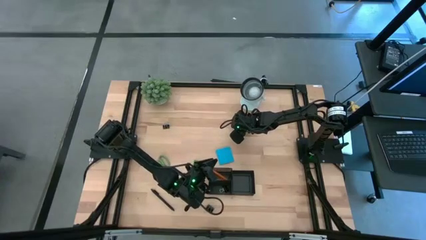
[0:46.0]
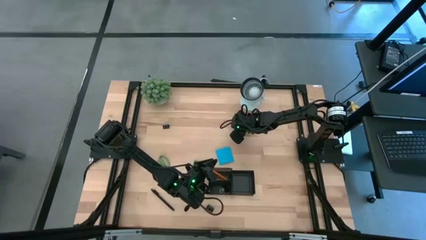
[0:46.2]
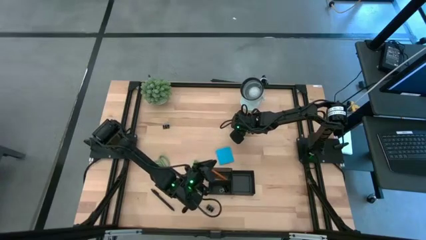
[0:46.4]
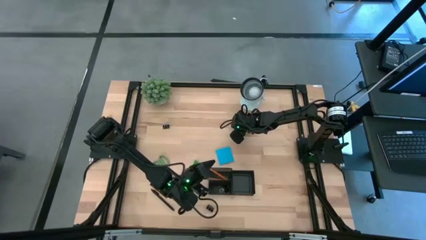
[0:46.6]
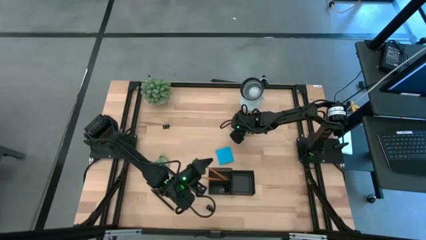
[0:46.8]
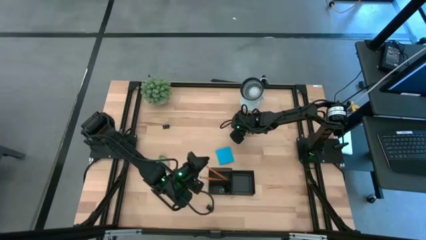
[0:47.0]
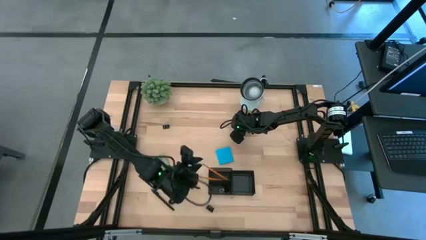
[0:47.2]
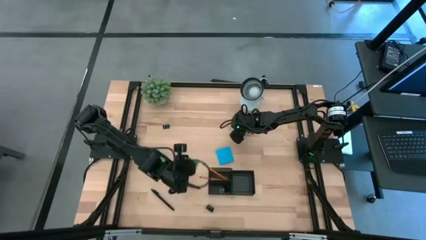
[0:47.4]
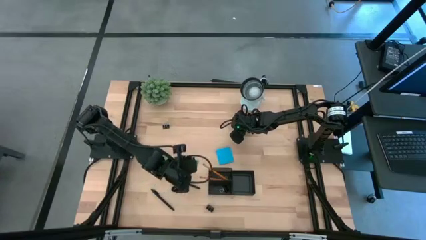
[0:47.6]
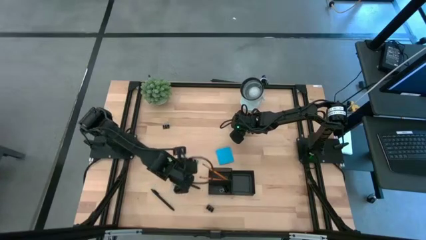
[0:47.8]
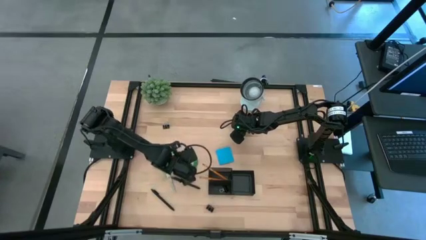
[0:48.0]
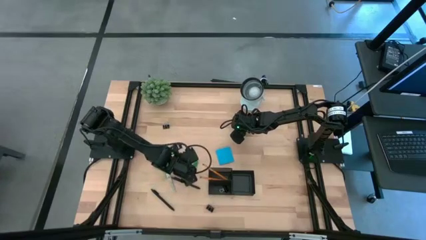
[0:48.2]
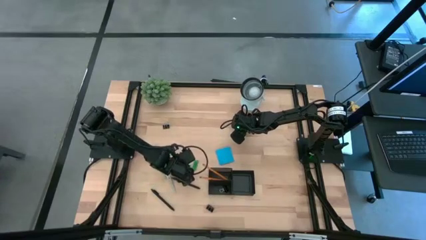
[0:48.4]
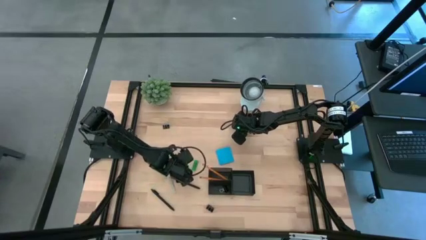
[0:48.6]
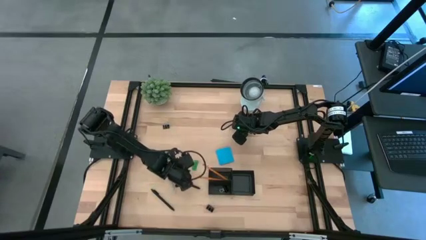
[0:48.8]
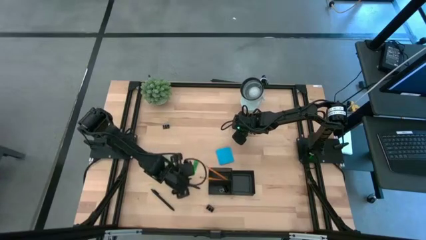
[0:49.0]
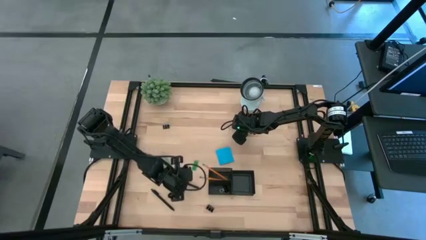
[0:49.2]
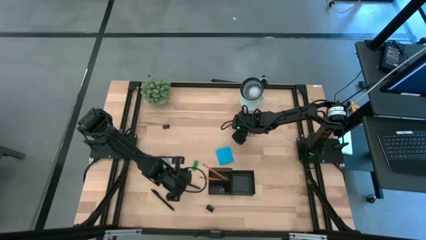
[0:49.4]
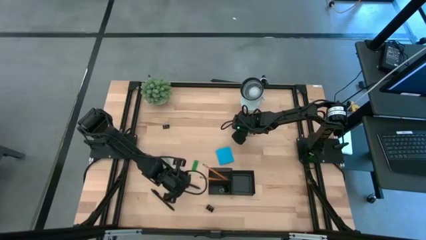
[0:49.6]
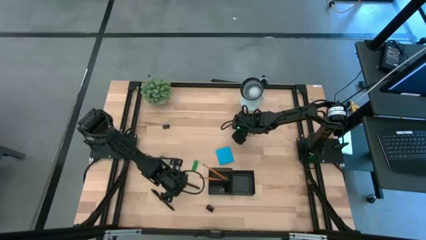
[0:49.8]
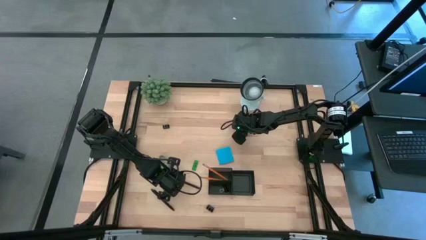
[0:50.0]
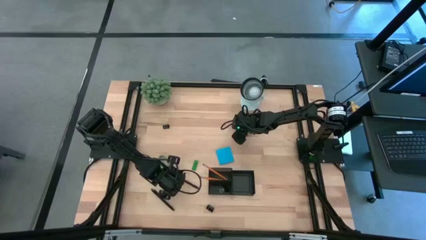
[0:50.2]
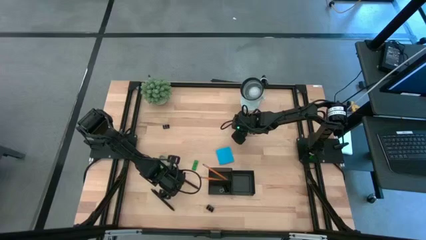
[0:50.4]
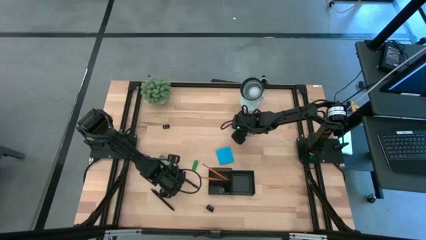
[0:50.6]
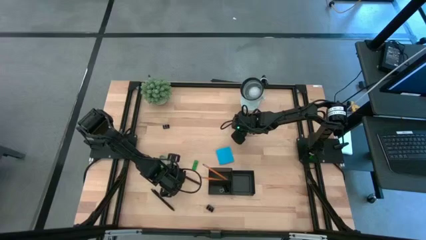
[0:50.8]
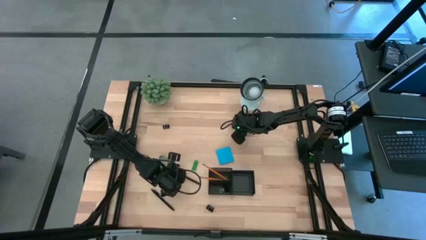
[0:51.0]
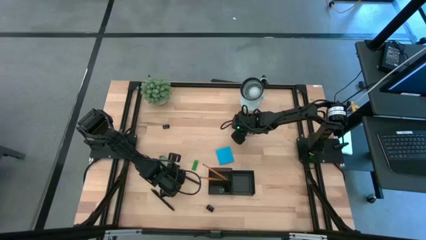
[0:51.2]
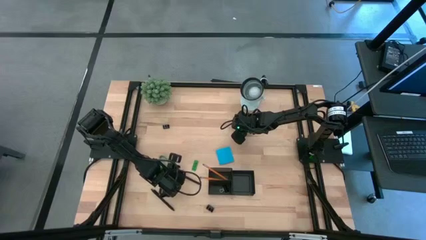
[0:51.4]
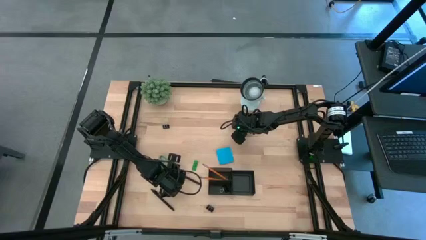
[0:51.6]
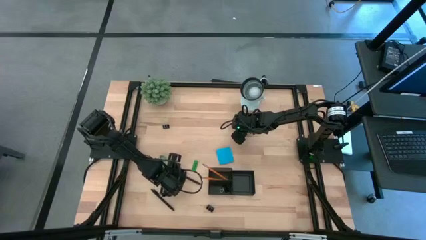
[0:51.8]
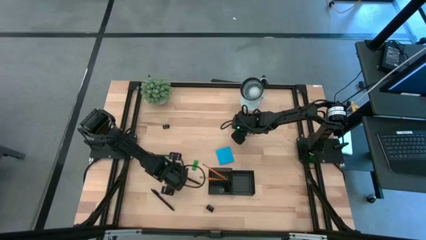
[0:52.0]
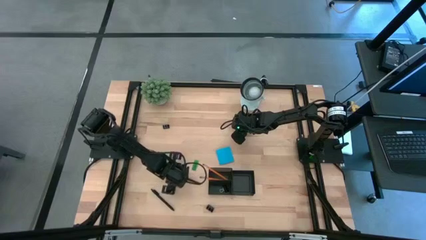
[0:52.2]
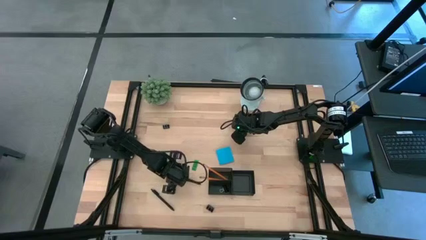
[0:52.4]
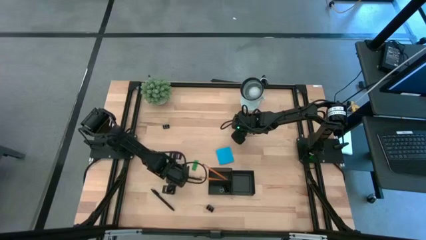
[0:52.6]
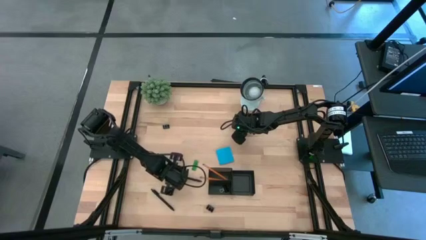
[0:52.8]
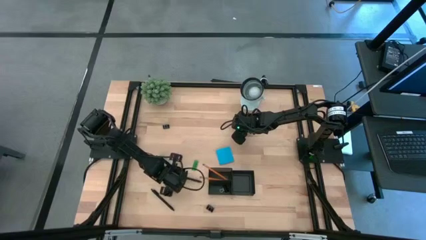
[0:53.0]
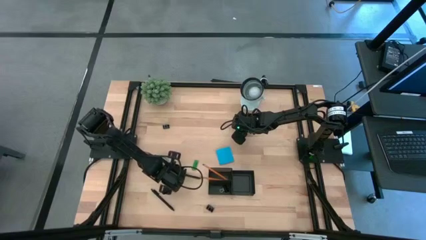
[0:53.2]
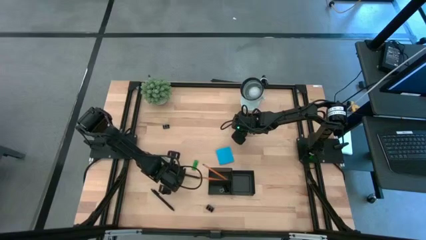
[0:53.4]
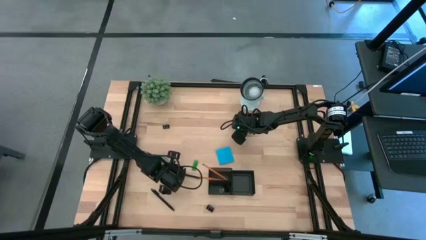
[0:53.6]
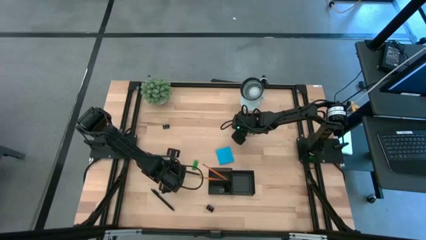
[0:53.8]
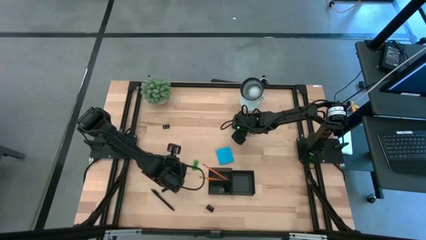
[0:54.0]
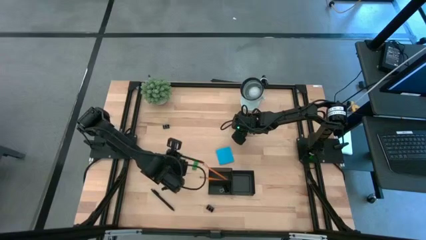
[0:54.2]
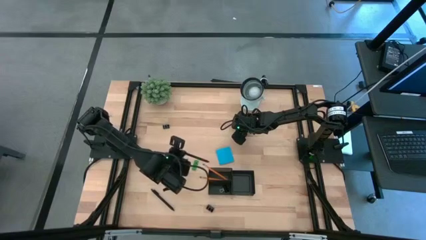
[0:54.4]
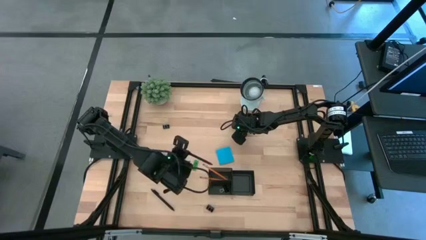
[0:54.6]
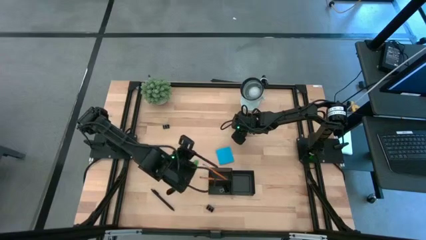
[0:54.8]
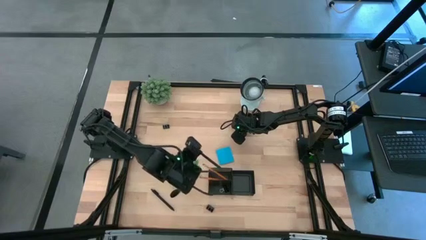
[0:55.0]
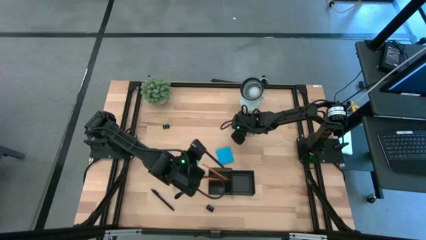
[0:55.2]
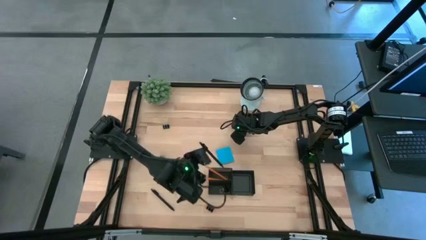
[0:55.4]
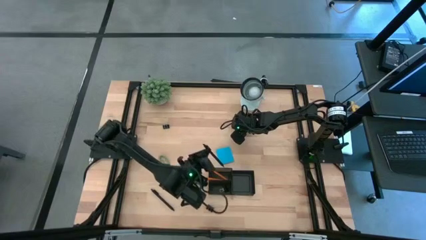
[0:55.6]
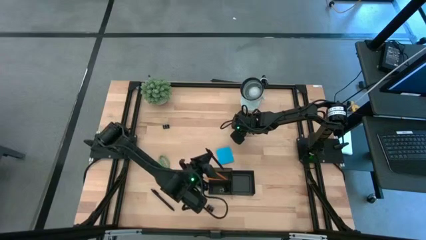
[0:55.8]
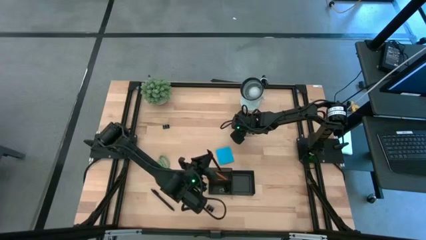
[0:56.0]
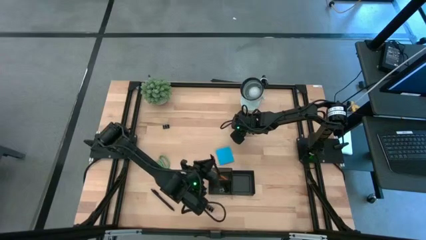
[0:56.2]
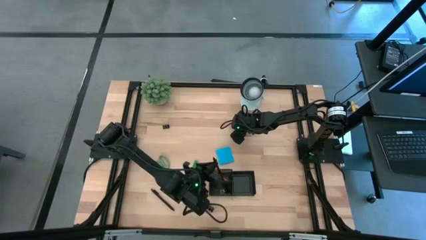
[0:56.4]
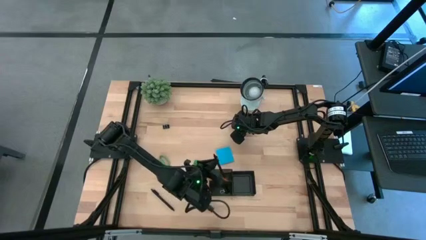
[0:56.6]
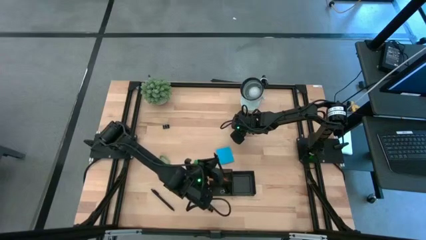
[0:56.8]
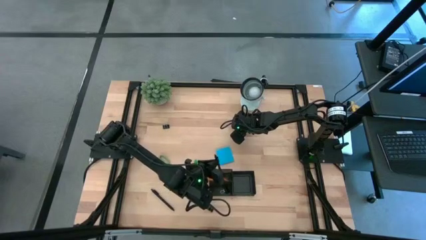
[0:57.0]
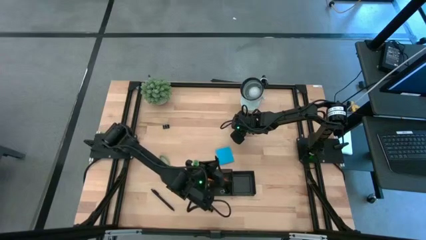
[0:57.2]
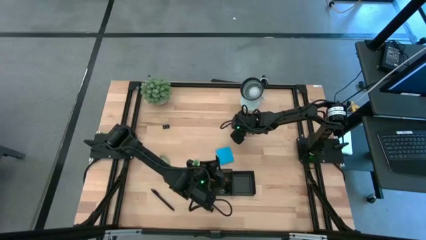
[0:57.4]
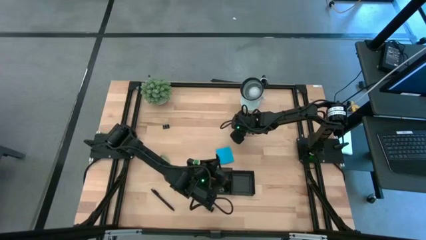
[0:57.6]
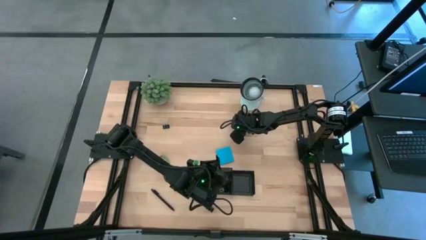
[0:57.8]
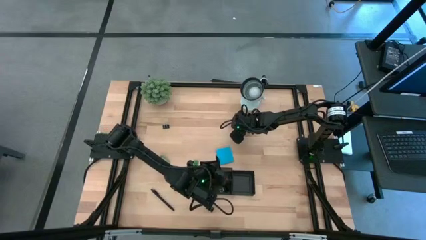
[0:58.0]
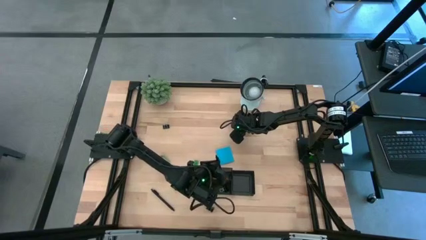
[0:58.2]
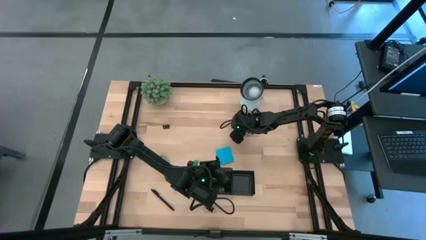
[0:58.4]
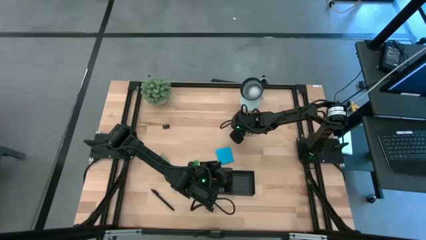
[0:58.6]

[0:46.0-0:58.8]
Task: Pick and place office supplies into organizer
Put the middle pen into the top left slot of the desk organizer

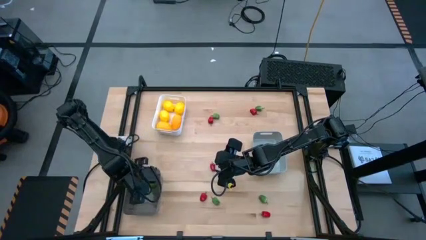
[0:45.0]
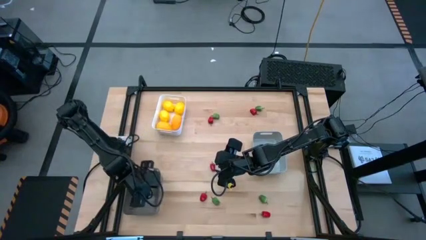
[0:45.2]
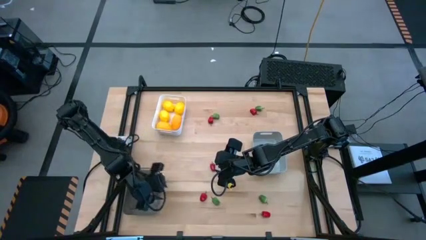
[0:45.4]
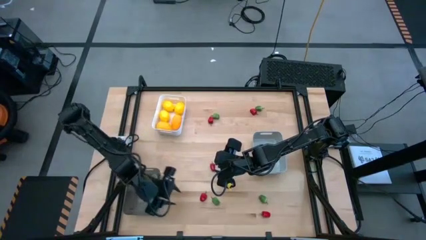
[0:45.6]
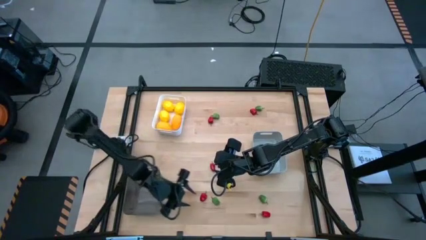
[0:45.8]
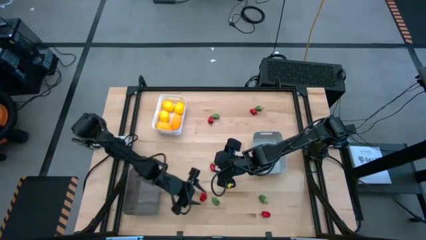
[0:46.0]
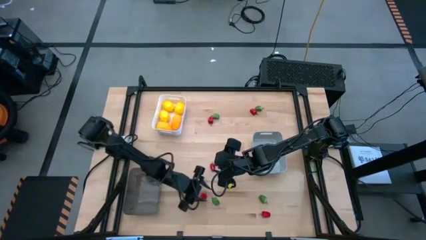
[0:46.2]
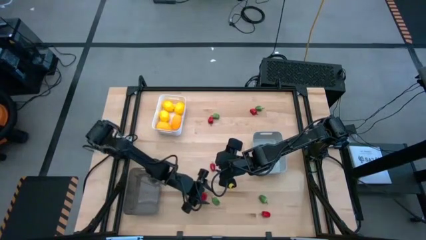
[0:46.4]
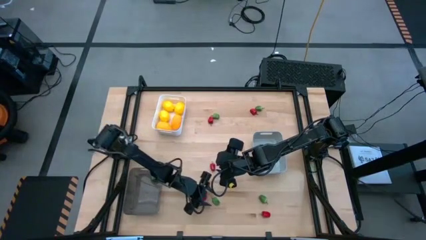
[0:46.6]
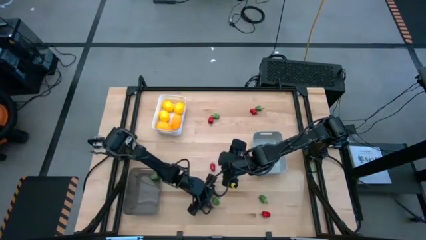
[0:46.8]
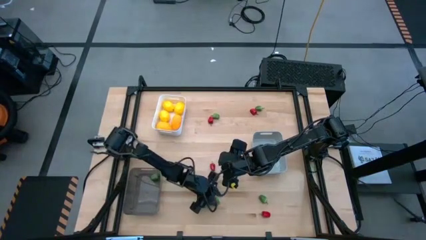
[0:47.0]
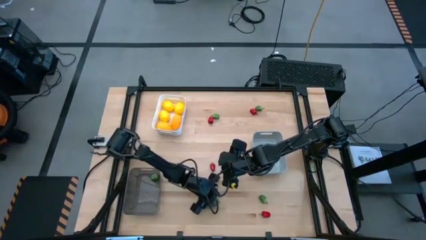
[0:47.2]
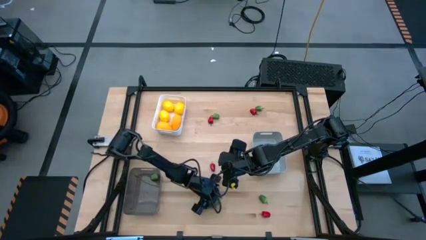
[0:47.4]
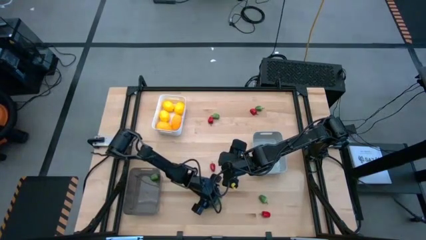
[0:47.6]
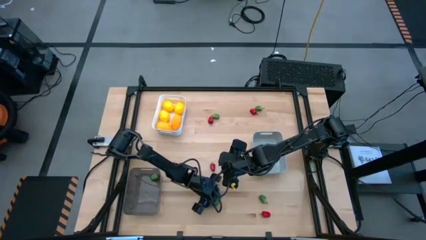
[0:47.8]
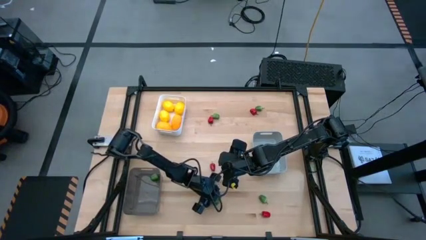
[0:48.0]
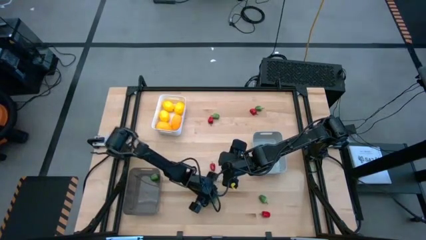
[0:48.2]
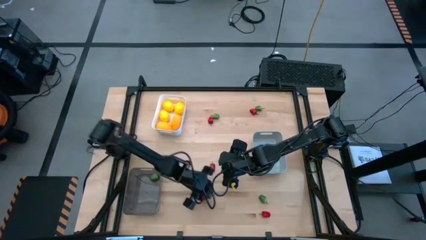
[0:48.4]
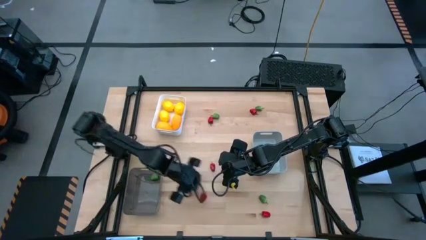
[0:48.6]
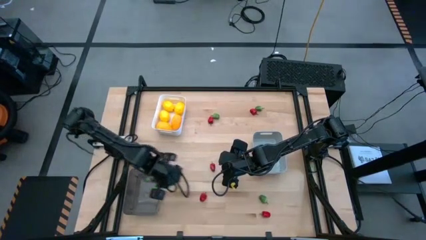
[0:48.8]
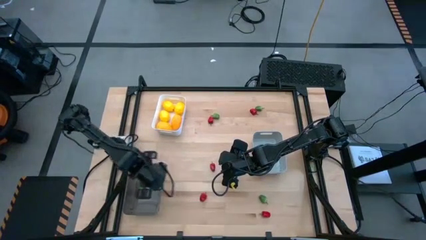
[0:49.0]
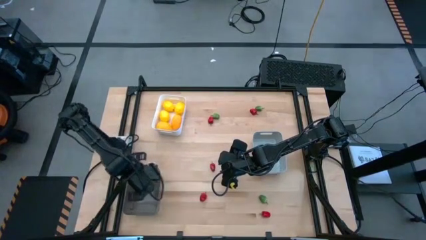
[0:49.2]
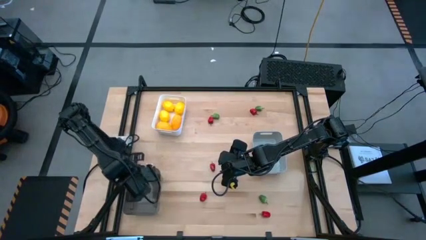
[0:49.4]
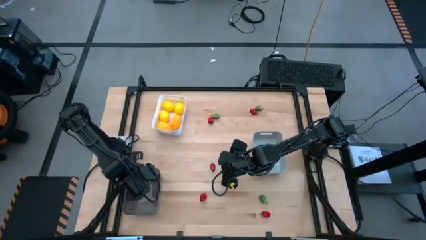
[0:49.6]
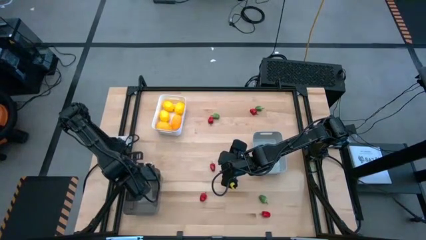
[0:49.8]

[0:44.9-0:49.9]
Task: Sort produce into baskets
Put the bottom left green chili pepper into the transparent black bin
